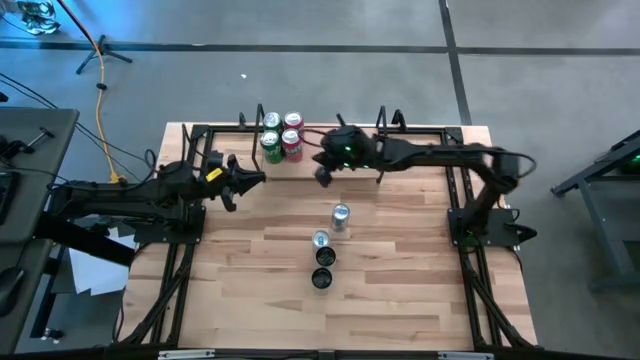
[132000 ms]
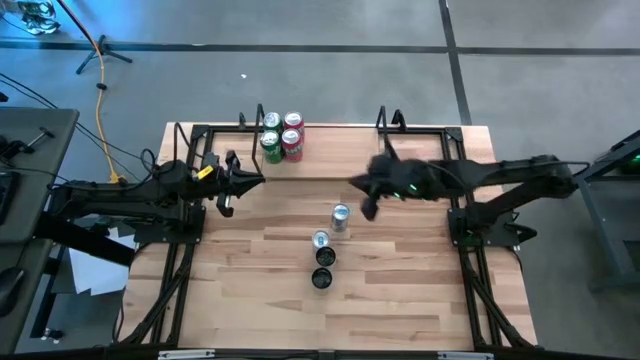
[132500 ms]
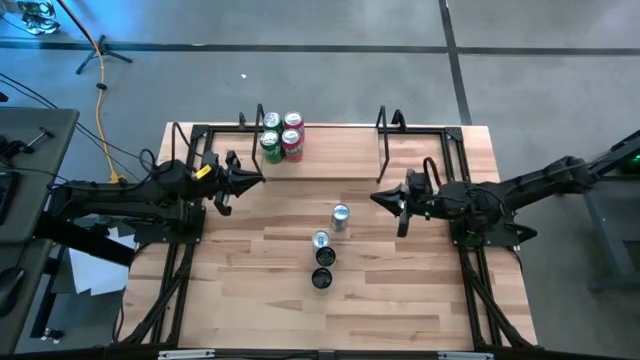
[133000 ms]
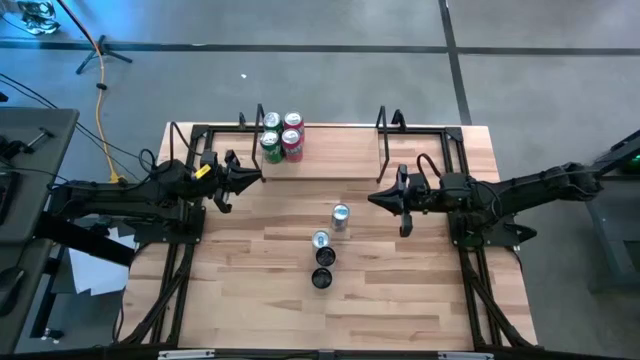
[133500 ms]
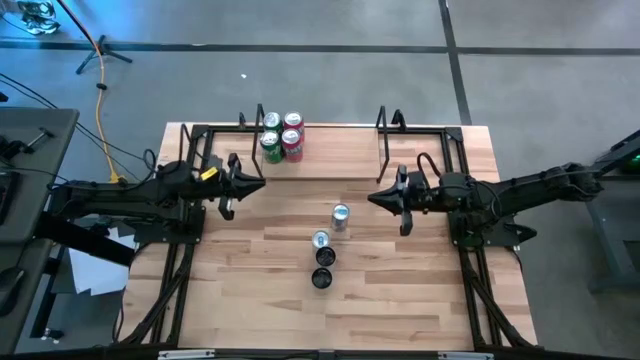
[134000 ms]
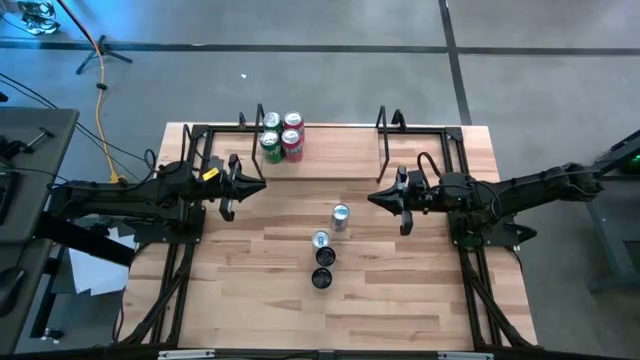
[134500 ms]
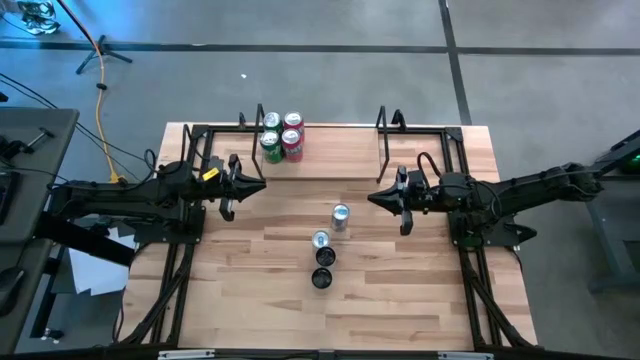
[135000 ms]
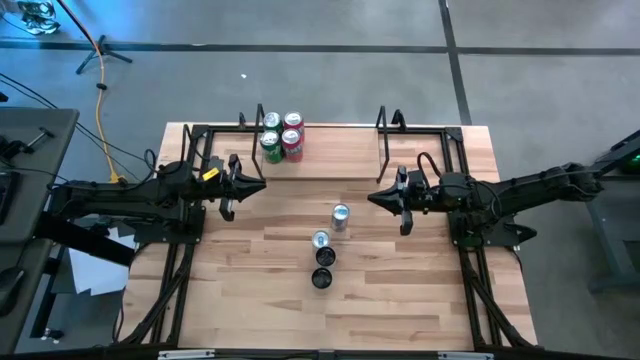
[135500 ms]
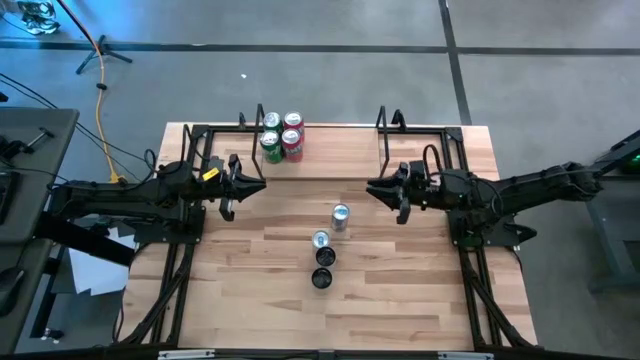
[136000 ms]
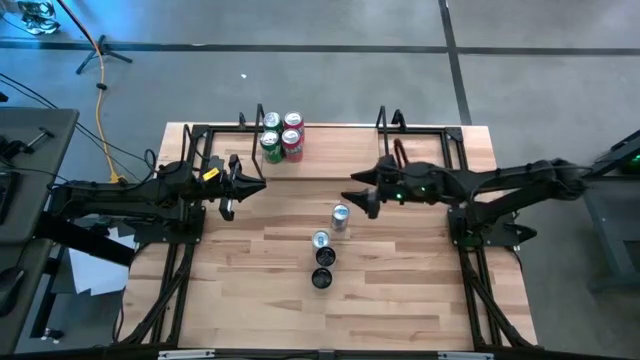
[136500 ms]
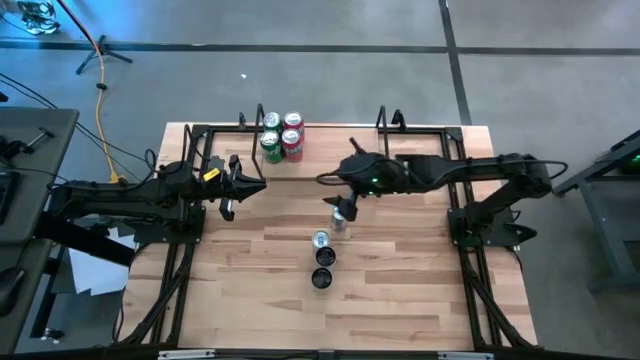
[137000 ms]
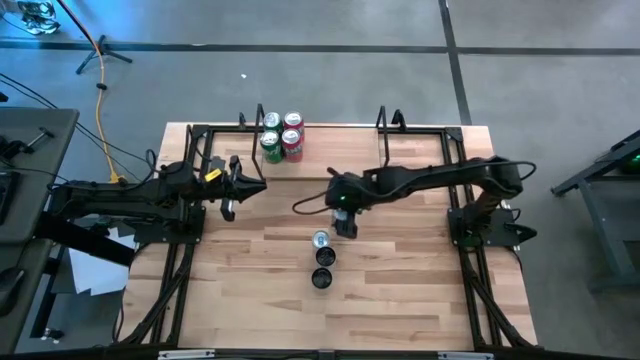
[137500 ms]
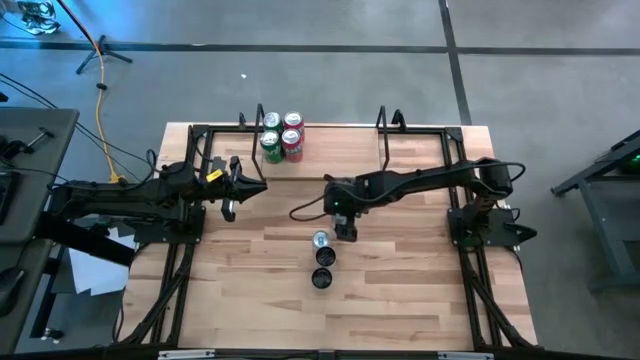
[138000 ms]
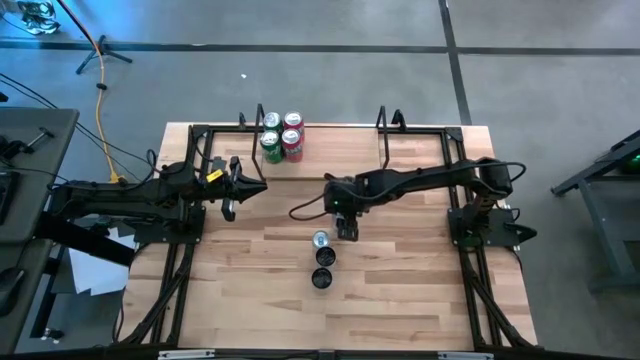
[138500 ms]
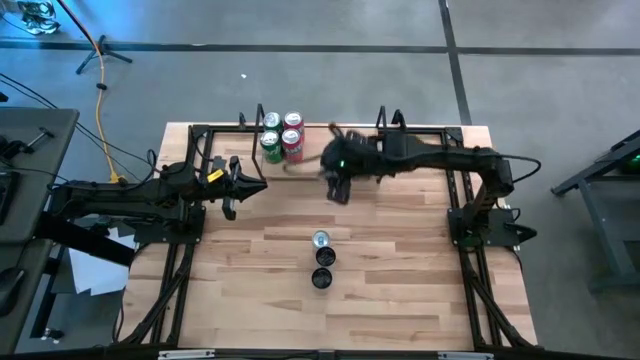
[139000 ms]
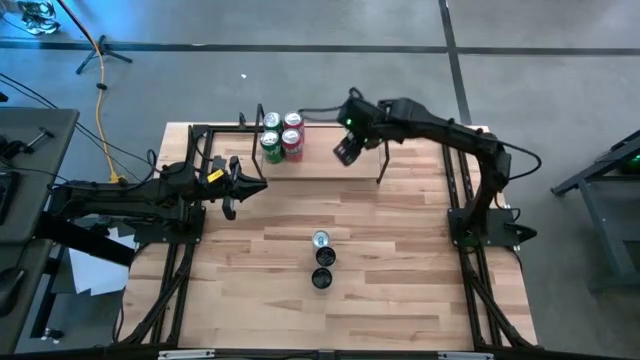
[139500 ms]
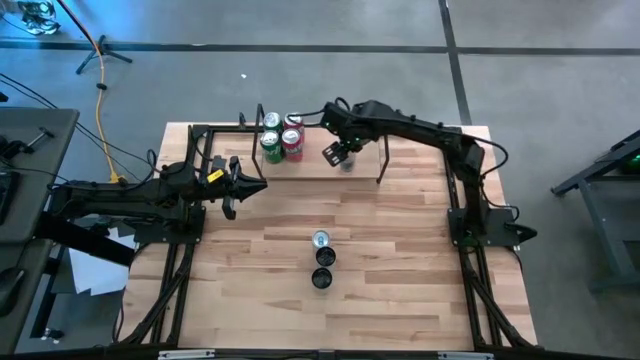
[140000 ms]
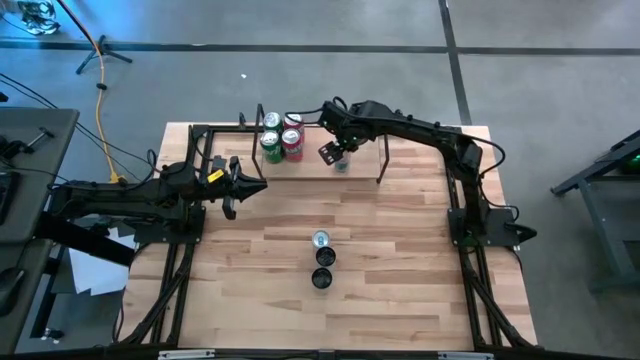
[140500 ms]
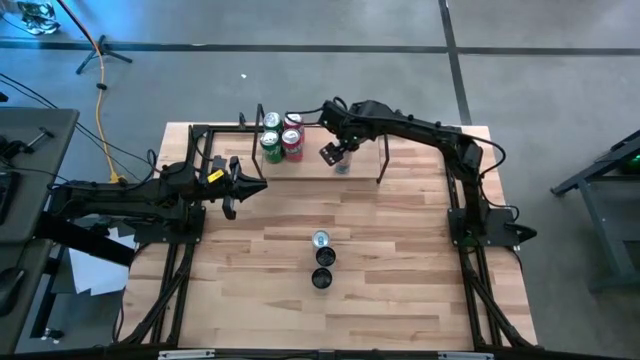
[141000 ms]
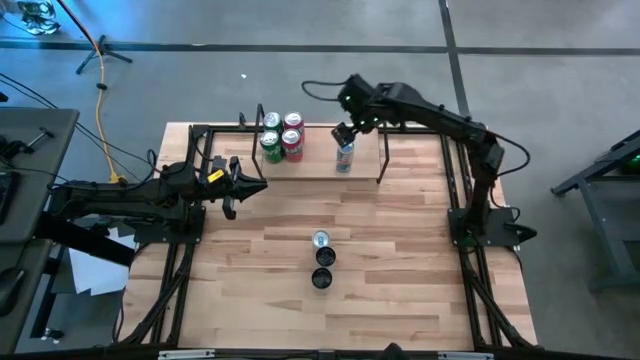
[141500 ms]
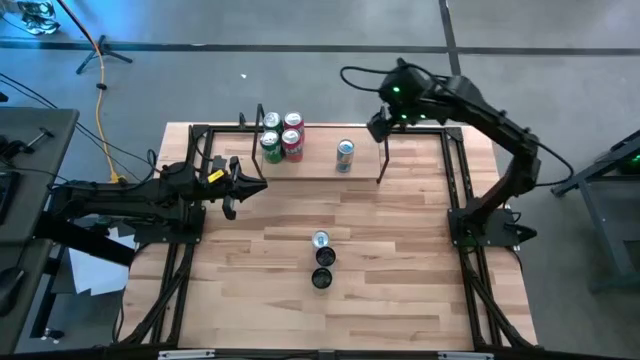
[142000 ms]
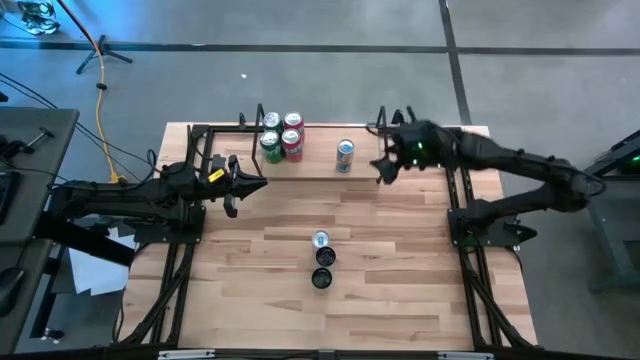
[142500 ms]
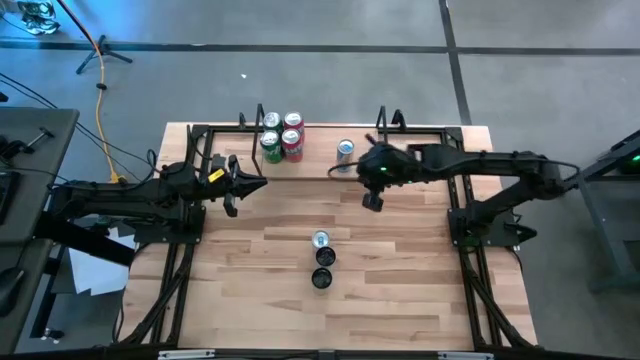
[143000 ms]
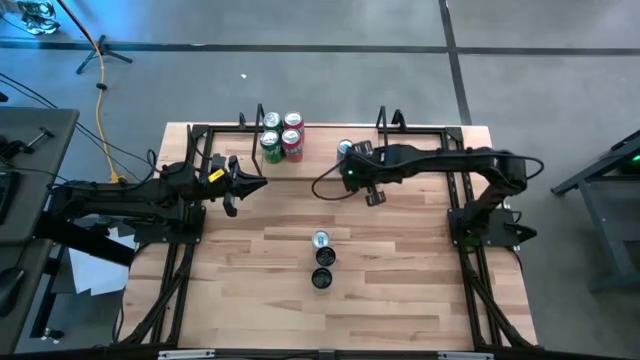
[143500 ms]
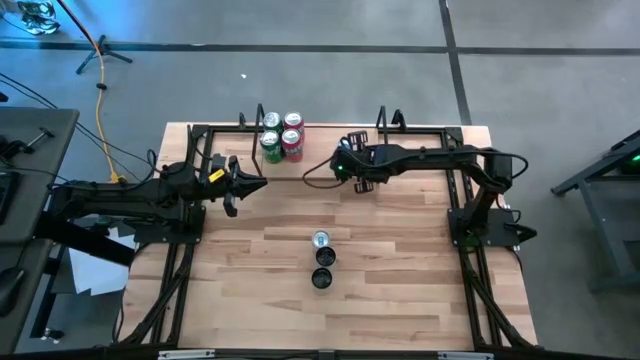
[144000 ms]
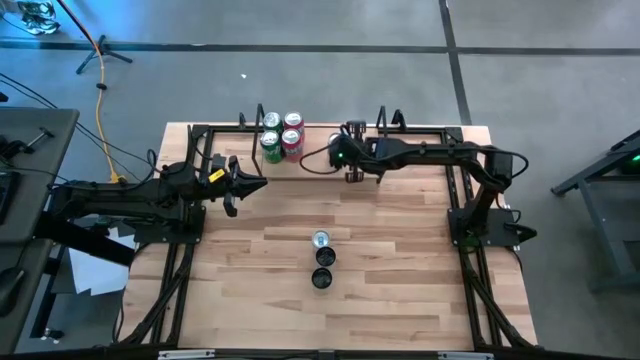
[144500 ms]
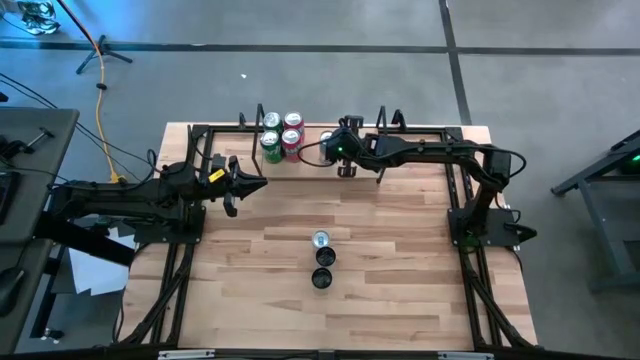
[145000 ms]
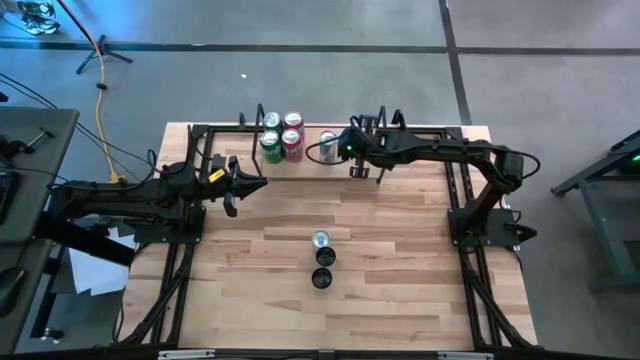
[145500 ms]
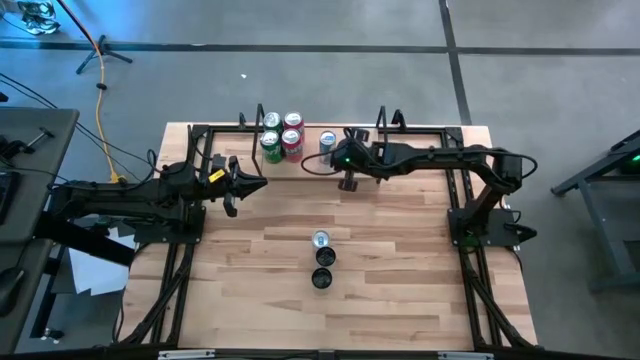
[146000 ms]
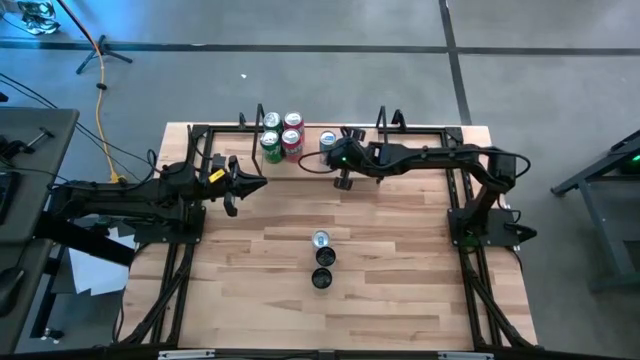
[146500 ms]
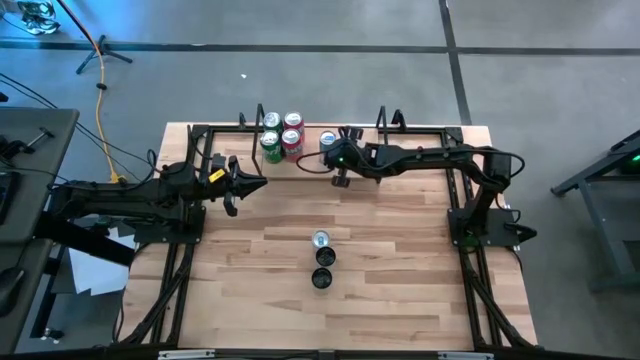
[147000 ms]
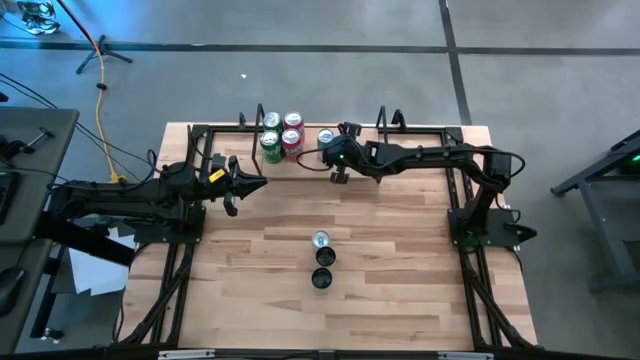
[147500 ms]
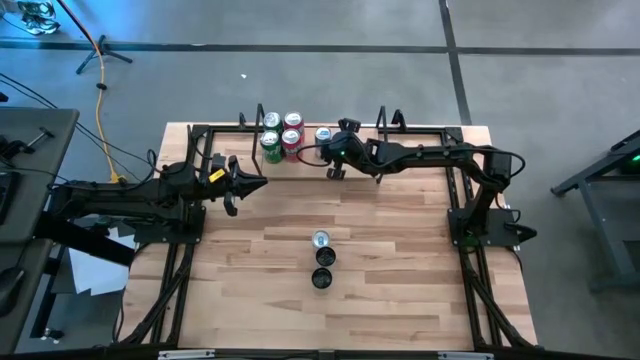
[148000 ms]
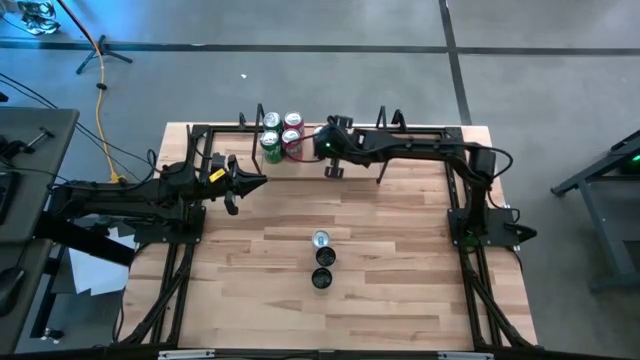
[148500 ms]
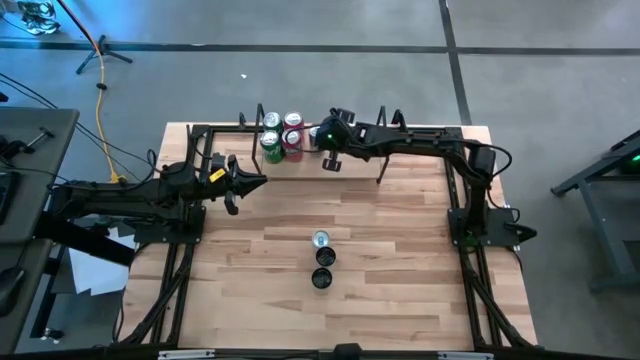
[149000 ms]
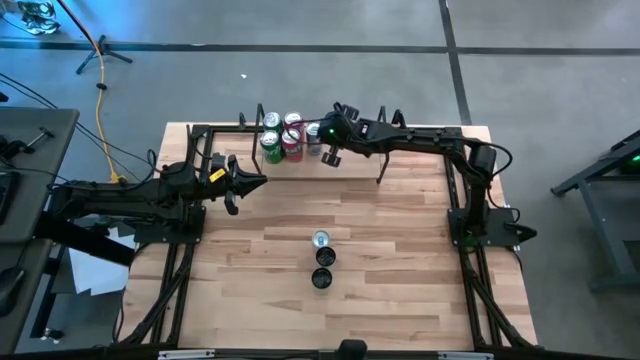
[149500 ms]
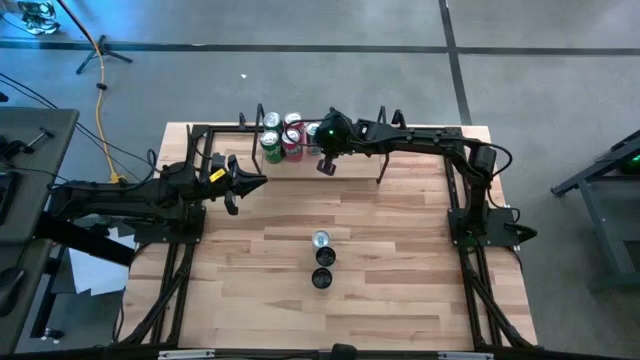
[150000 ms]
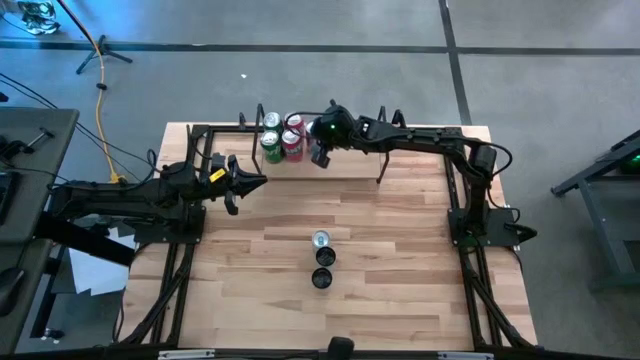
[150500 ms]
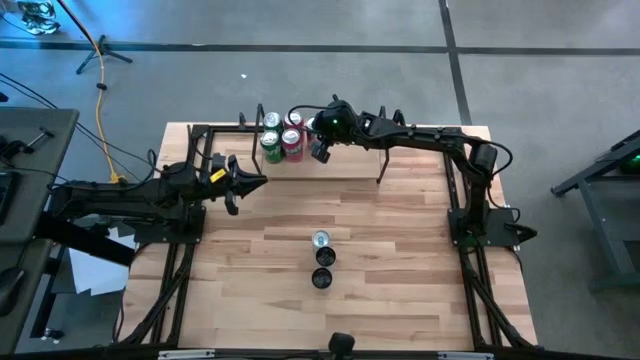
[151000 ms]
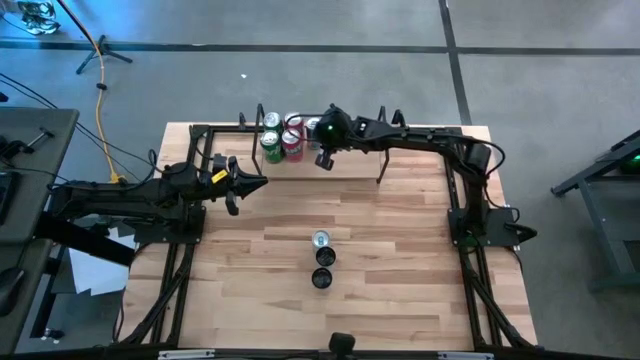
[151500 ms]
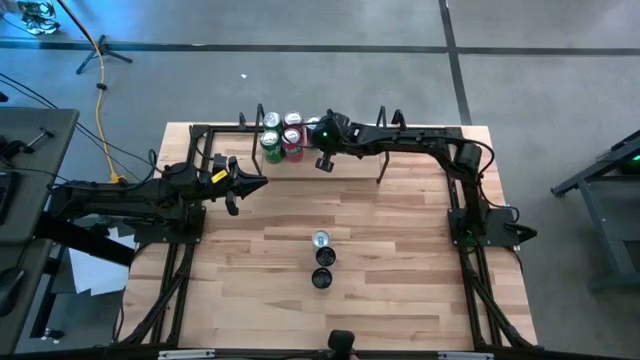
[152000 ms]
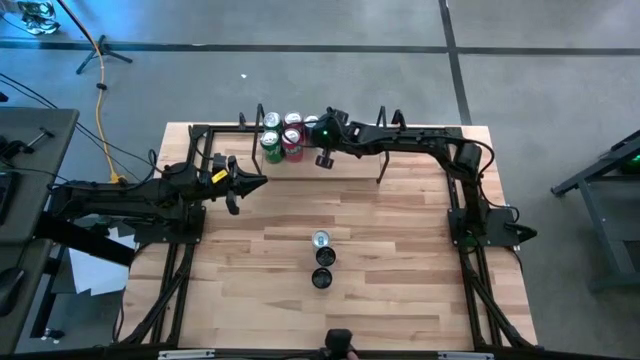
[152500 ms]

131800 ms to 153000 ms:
Task: Place canned beverage on shelf
Put the top blue soda can on the shelf
